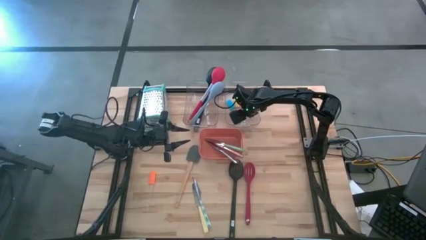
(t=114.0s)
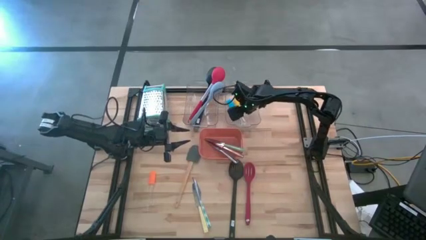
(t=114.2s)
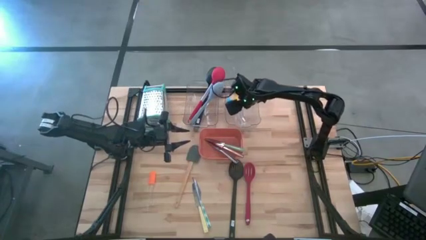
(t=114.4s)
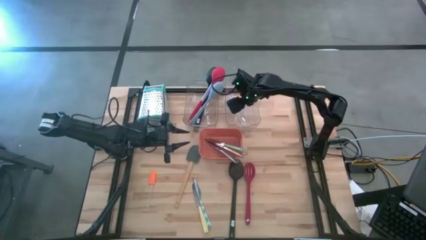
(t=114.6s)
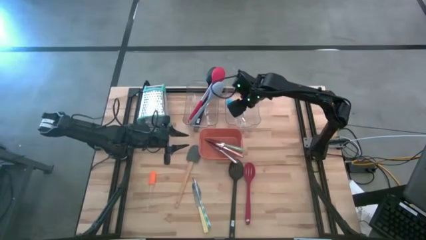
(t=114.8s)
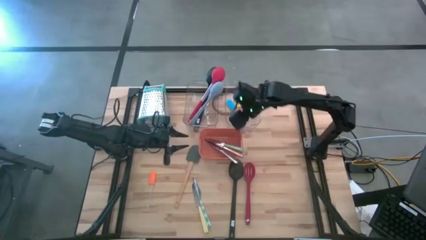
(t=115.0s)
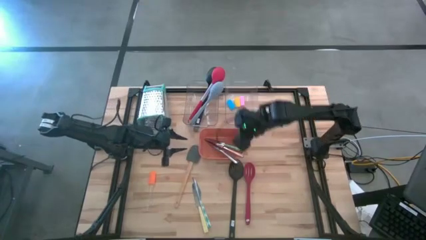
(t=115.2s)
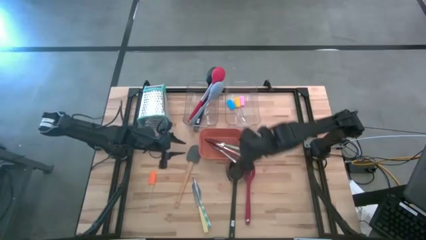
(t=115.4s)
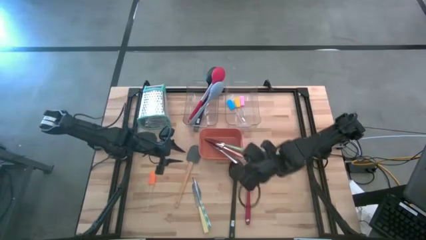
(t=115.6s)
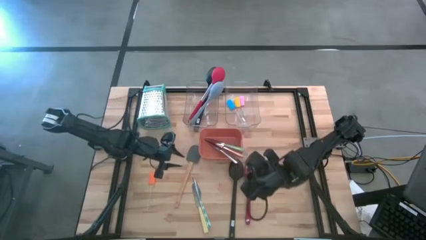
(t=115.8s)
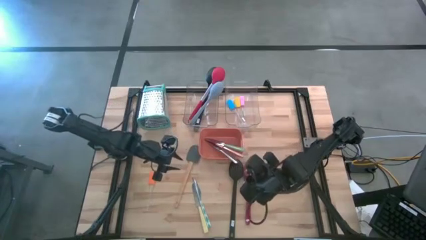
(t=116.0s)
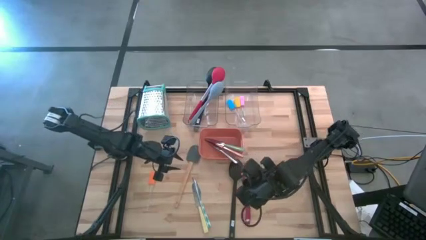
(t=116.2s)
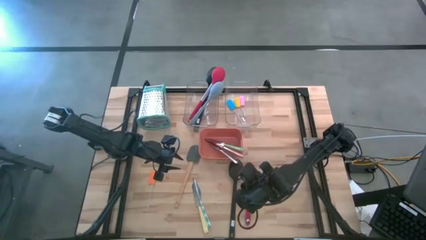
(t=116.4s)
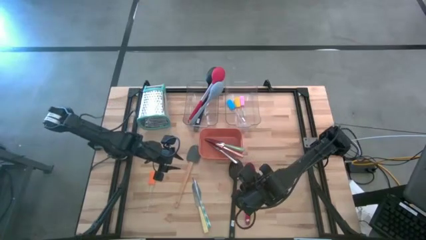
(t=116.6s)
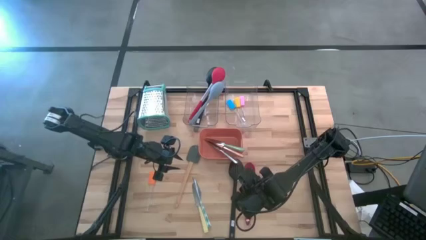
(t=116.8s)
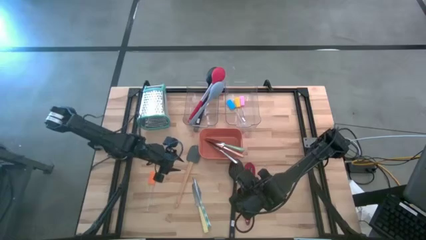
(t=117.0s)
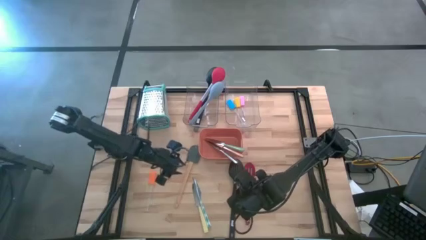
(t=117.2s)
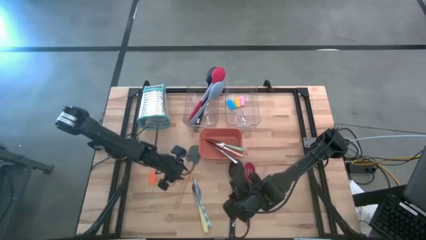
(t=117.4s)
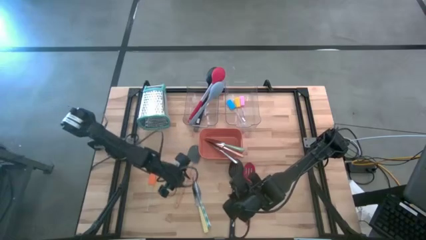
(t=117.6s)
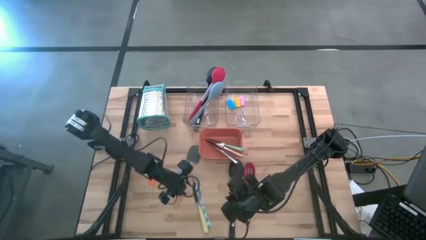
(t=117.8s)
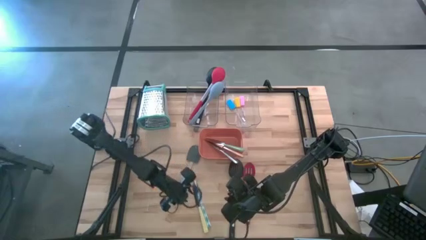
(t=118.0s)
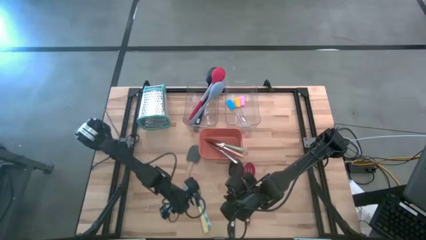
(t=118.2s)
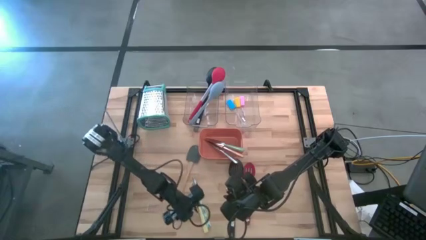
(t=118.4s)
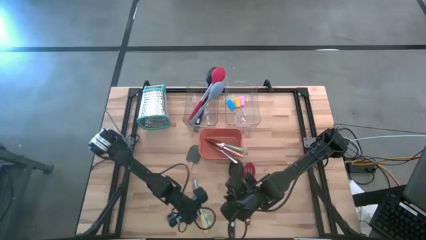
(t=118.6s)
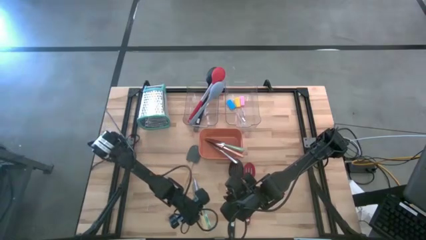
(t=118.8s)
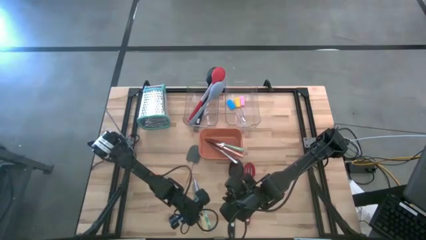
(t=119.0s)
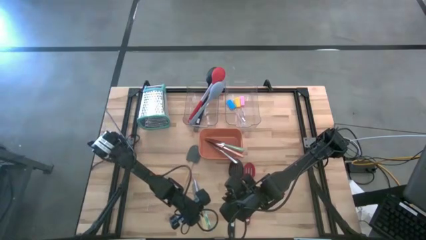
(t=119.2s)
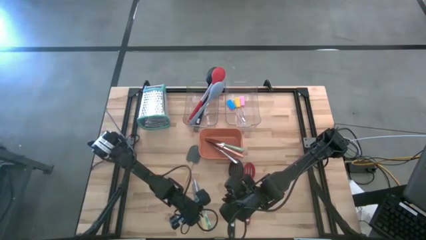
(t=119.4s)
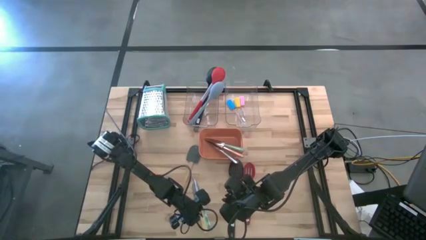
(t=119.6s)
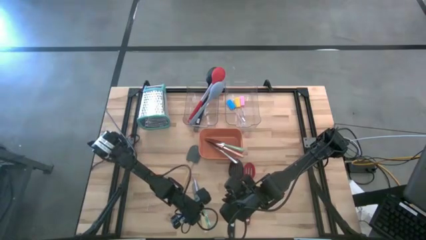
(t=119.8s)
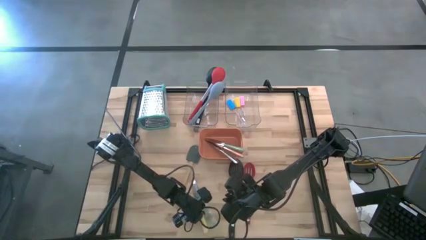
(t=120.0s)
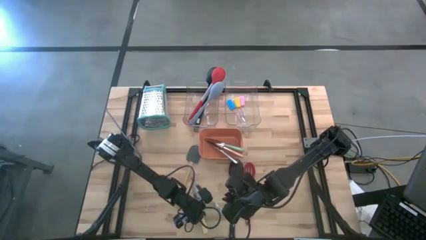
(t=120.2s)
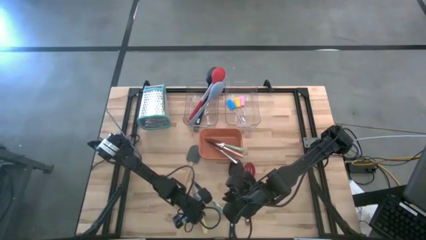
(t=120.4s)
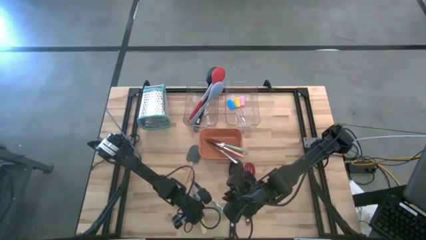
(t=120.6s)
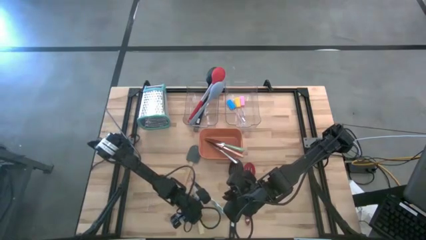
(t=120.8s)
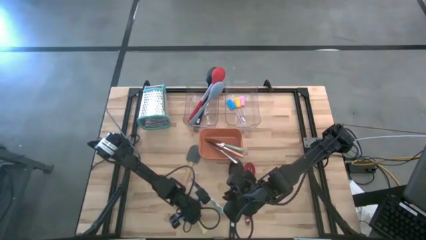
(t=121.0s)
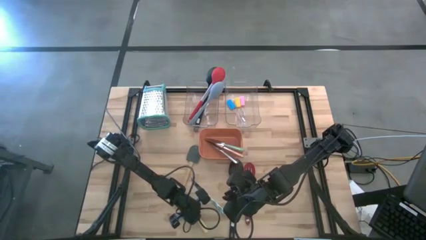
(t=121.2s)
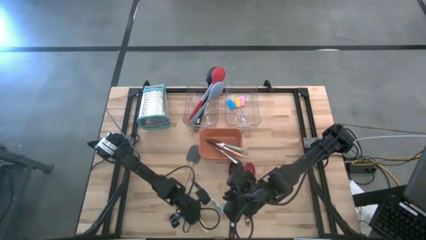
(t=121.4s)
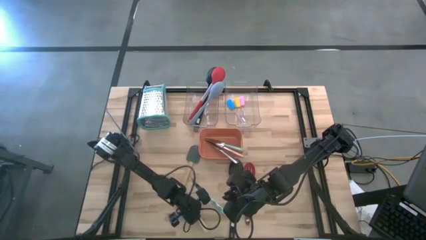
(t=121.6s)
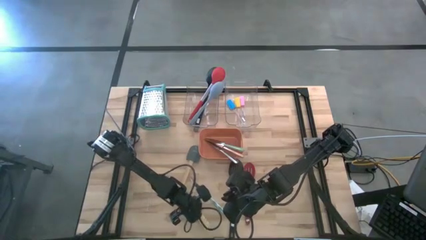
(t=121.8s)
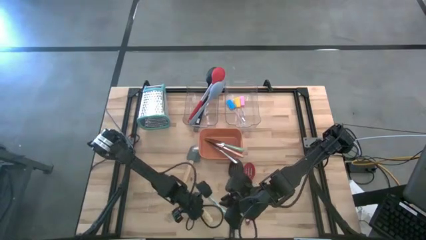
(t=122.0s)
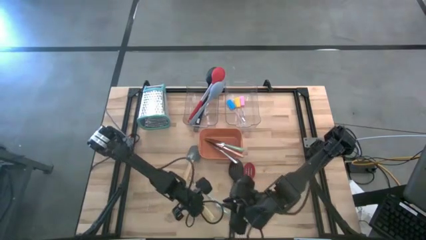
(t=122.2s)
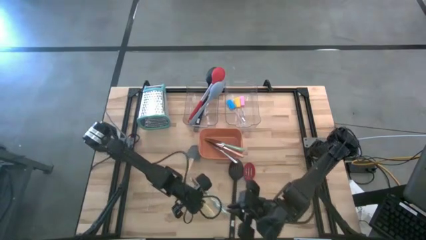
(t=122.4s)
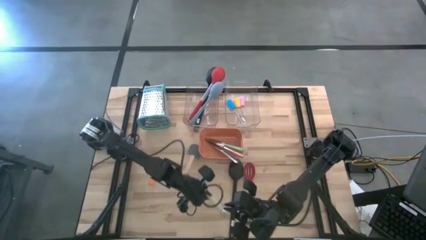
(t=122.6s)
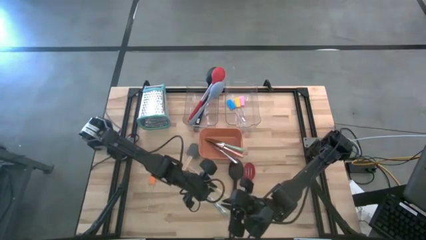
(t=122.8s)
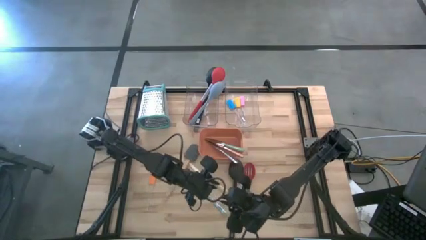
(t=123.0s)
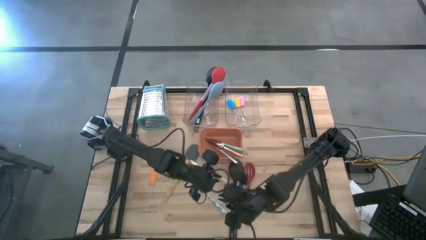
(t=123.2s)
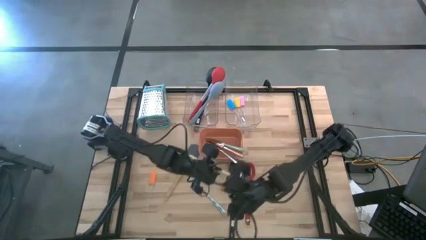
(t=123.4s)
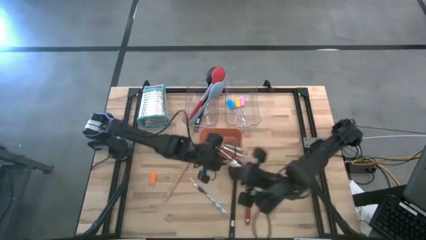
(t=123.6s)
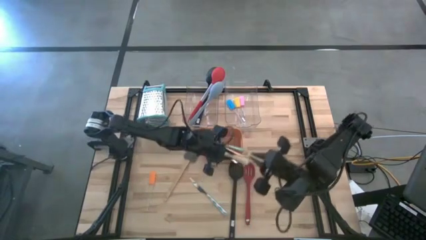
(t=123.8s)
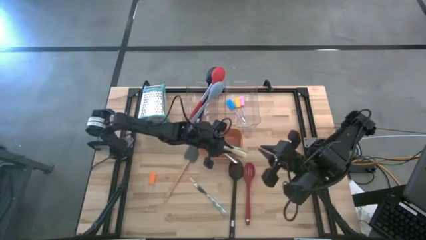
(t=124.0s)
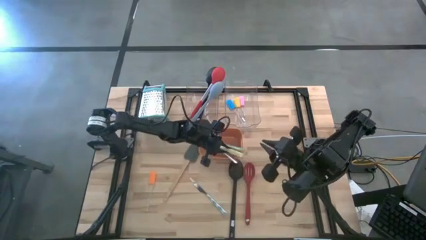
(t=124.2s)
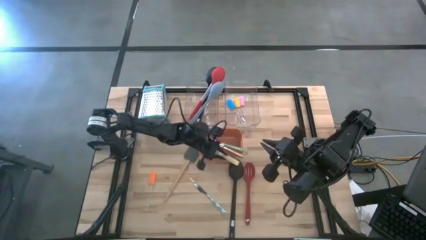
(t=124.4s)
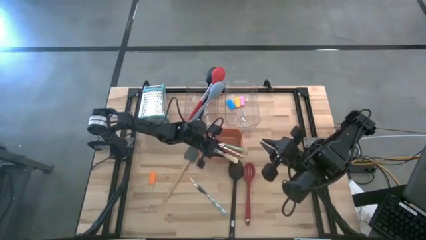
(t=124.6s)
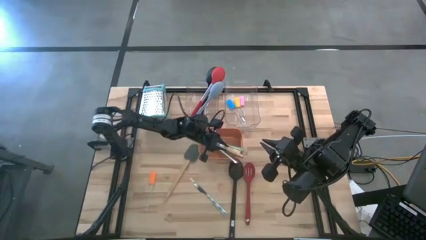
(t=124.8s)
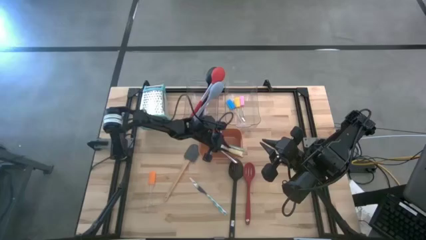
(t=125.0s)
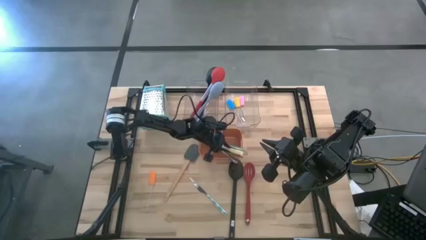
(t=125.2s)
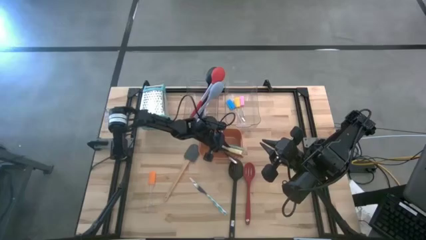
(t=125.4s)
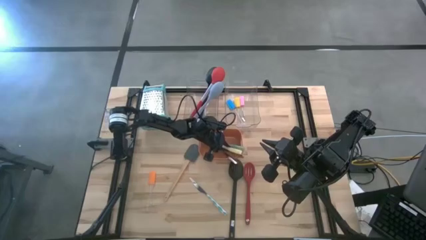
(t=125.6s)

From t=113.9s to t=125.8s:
Task: Pick & Place Kitchen Items
Put the yellow knife into the orange bin

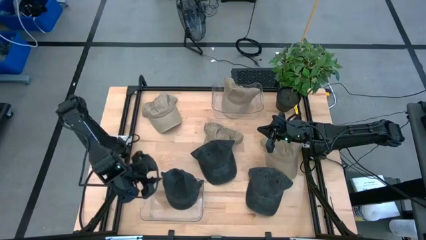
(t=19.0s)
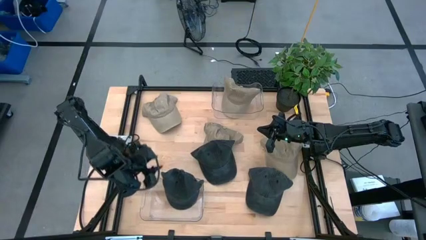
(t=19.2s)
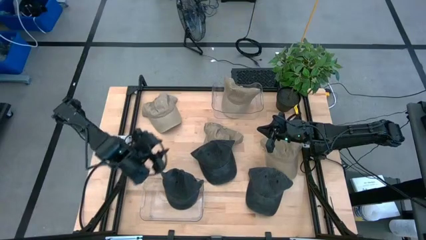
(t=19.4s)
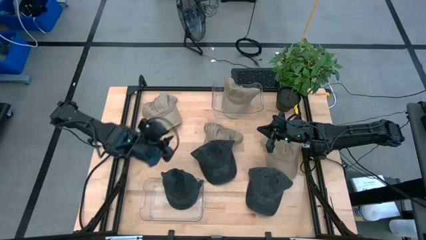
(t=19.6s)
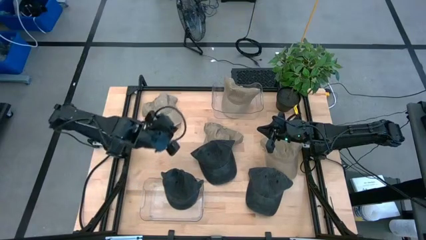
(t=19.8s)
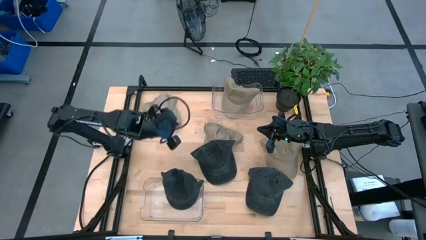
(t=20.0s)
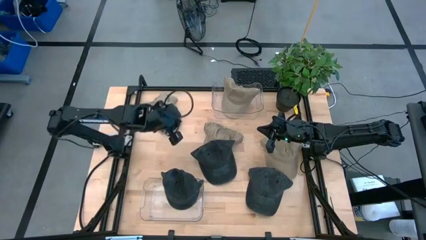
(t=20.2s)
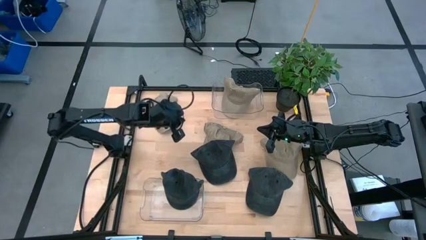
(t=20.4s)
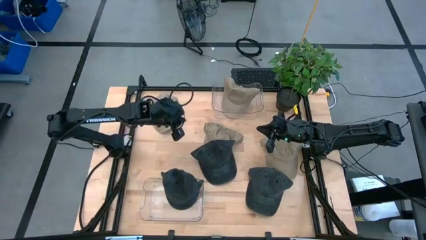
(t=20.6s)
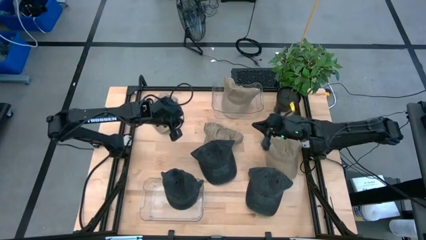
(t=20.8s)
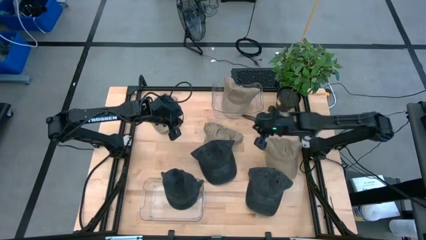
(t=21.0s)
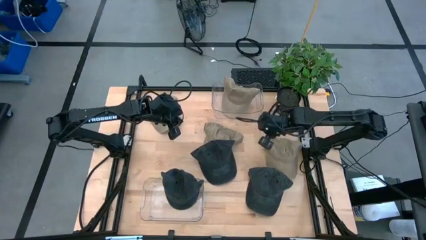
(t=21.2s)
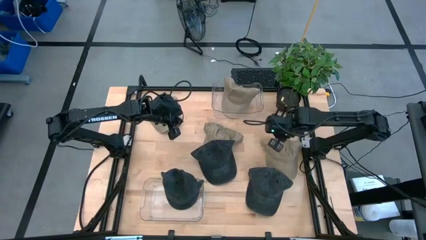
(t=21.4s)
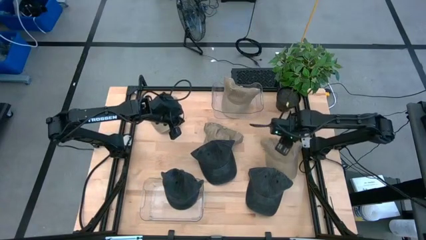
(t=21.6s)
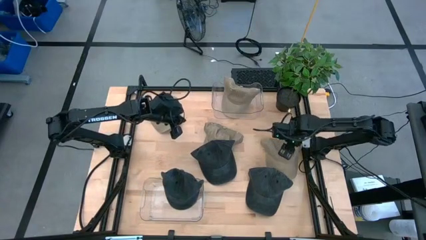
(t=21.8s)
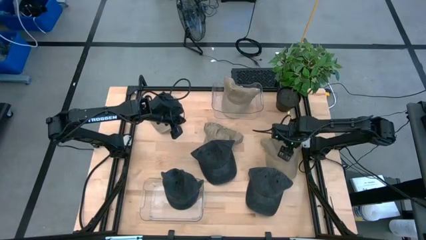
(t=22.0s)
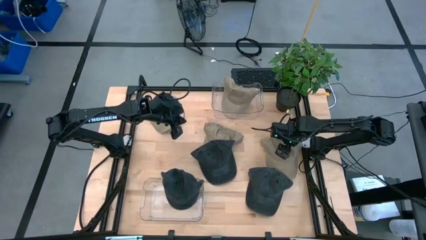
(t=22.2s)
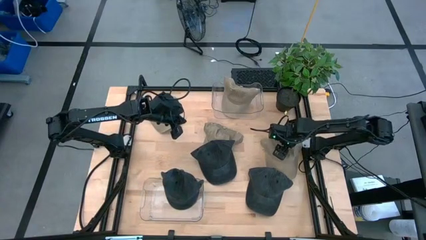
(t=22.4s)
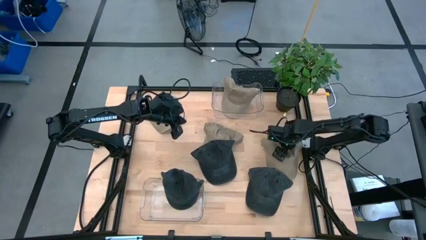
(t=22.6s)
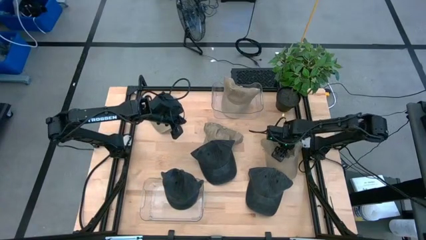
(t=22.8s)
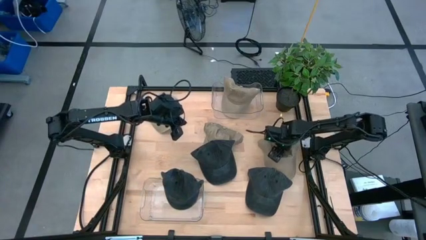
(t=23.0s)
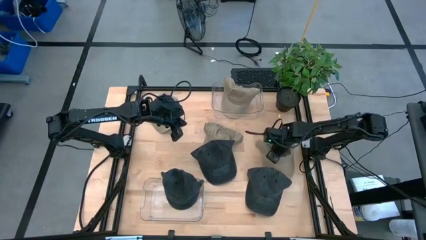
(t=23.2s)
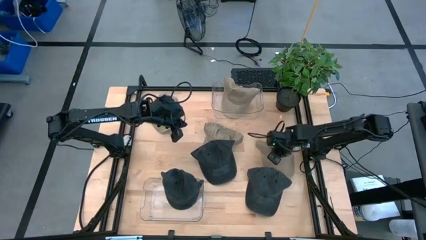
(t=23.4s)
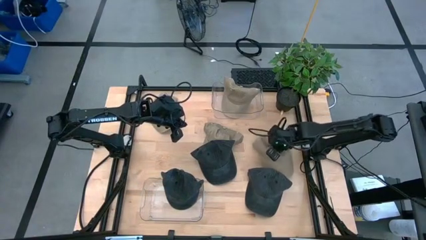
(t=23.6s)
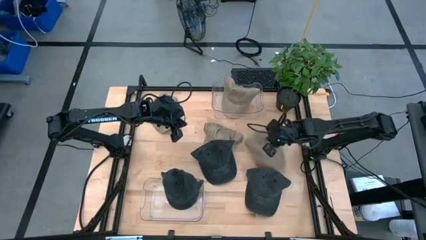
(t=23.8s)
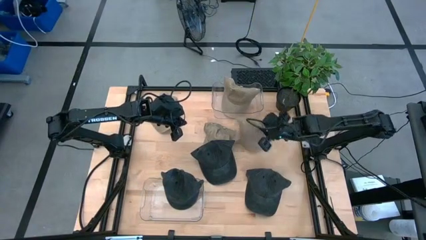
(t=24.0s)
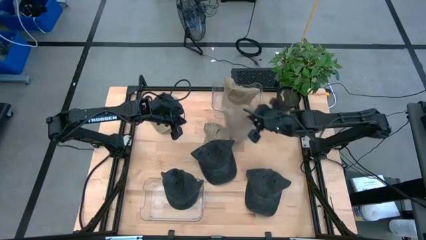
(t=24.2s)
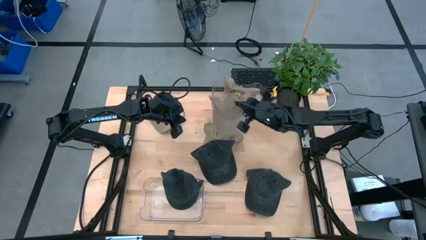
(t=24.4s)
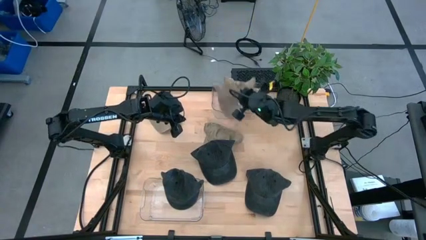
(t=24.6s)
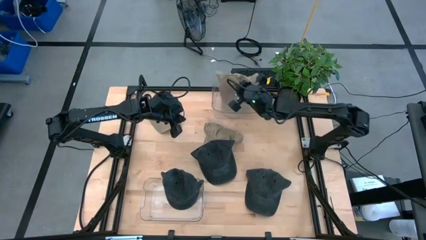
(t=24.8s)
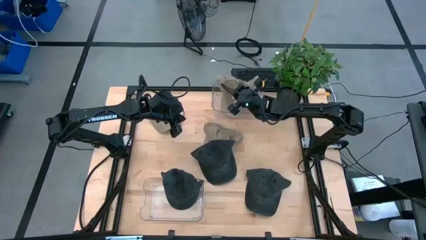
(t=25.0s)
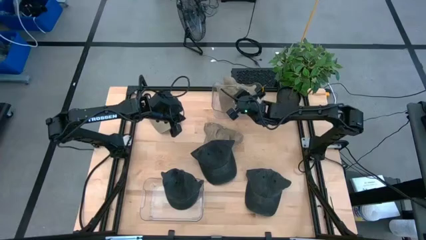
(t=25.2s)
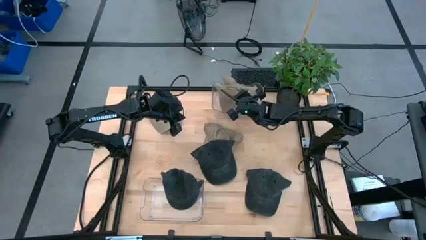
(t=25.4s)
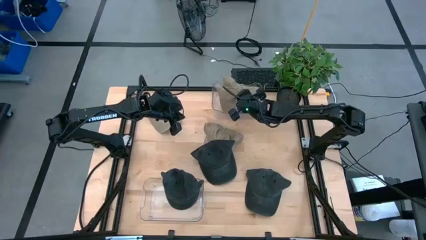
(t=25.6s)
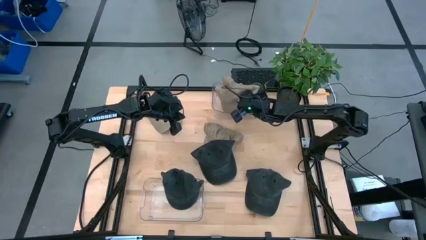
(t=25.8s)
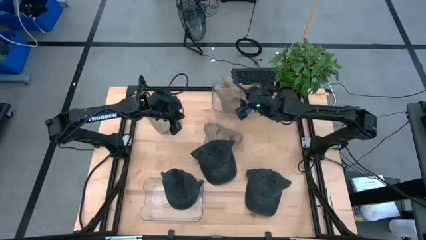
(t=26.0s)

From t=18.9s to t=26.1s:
Task: Pick & Place hat
Put the brown cap into the top transparent bin
